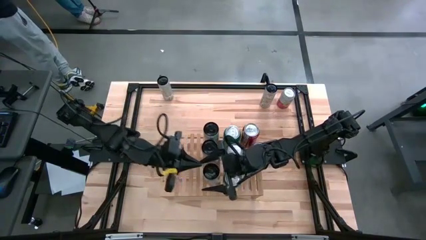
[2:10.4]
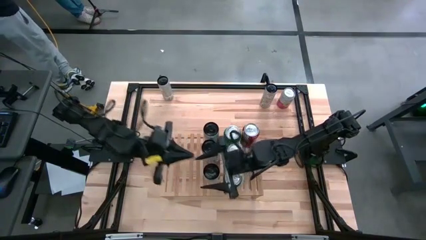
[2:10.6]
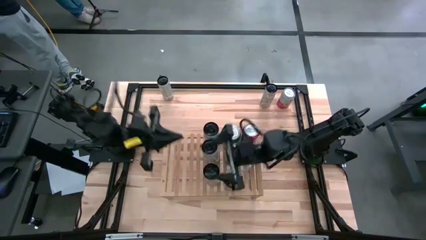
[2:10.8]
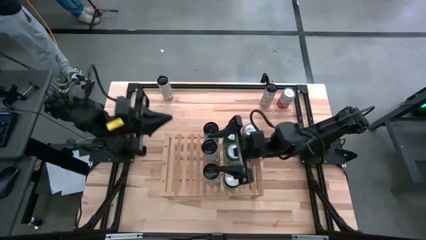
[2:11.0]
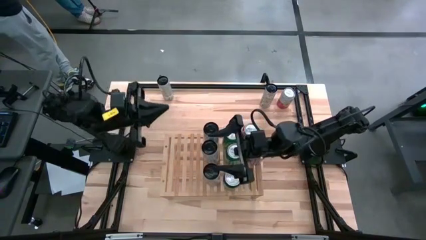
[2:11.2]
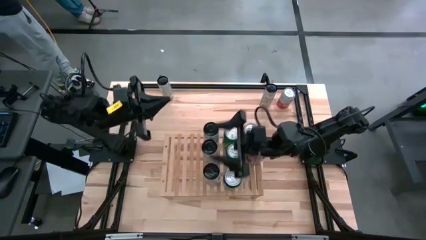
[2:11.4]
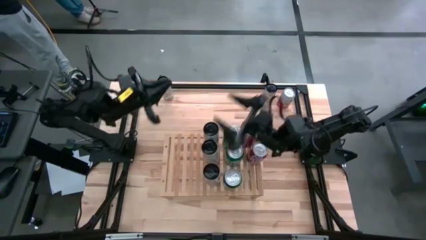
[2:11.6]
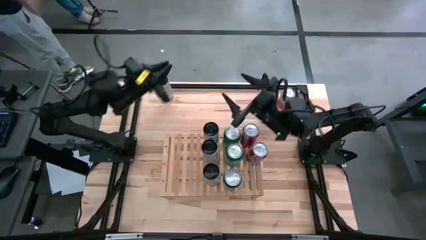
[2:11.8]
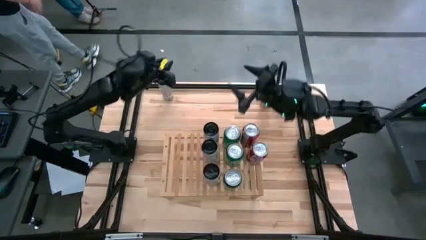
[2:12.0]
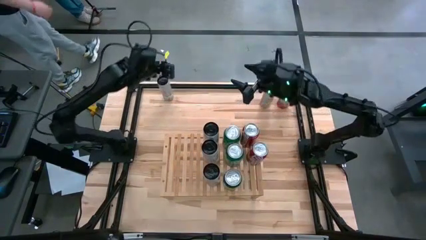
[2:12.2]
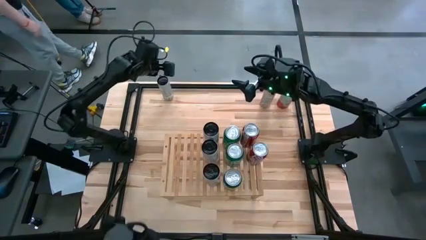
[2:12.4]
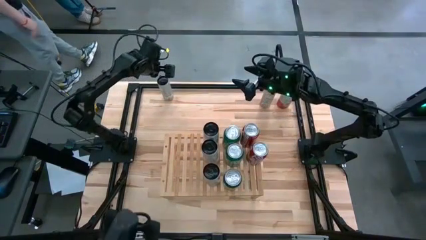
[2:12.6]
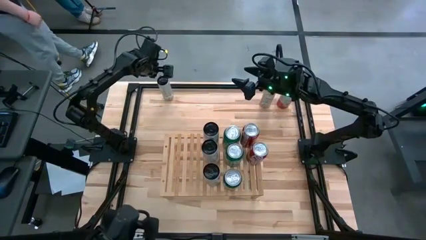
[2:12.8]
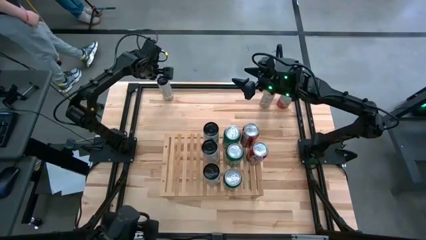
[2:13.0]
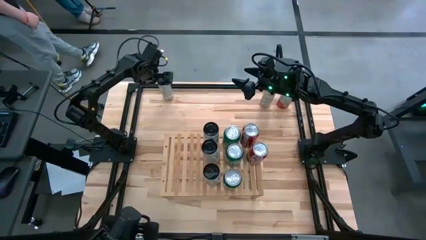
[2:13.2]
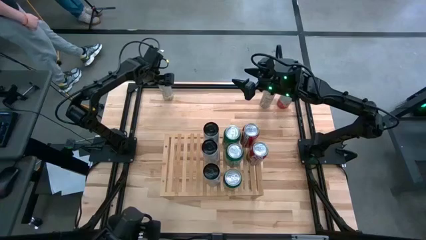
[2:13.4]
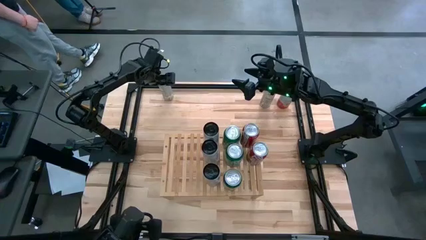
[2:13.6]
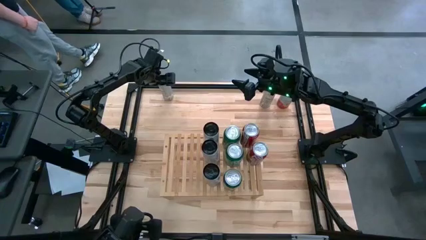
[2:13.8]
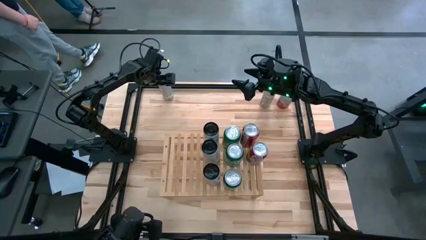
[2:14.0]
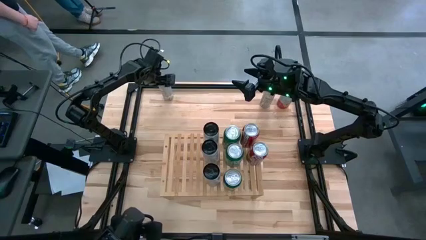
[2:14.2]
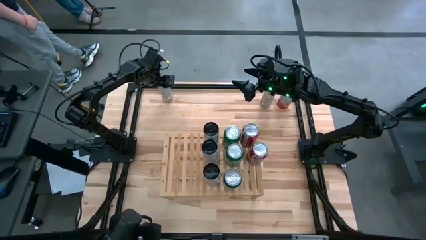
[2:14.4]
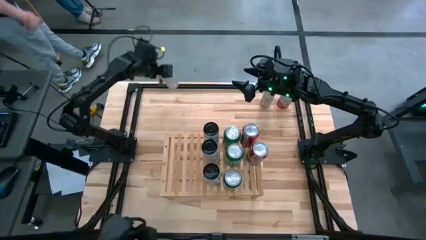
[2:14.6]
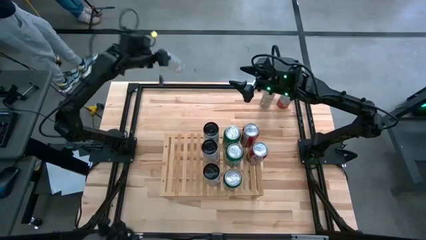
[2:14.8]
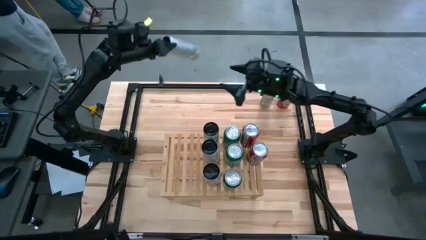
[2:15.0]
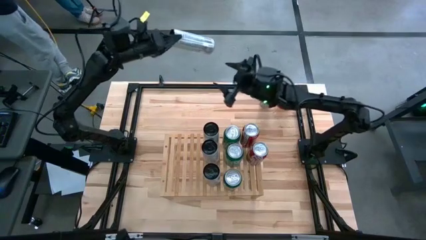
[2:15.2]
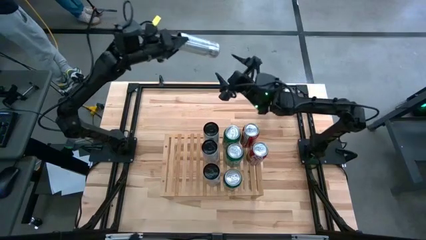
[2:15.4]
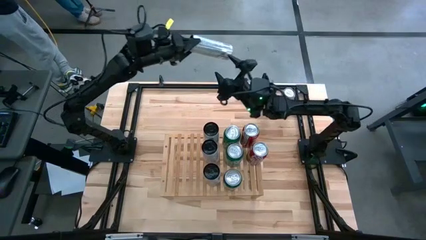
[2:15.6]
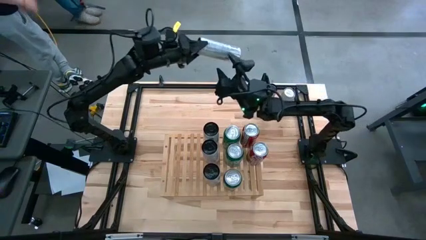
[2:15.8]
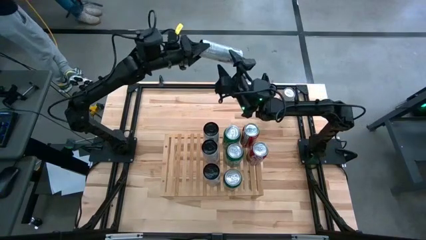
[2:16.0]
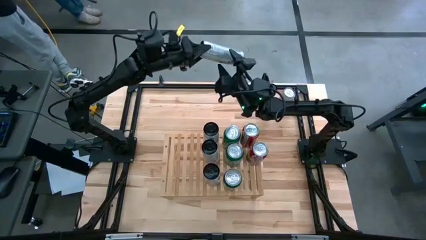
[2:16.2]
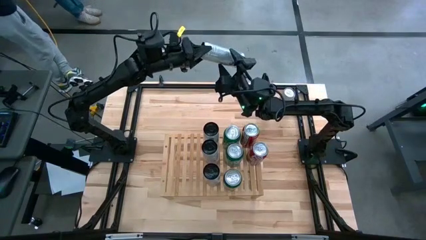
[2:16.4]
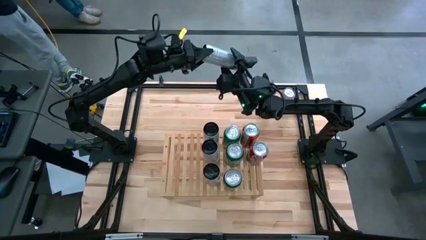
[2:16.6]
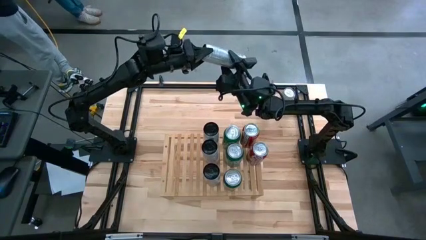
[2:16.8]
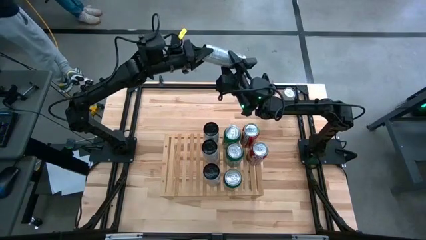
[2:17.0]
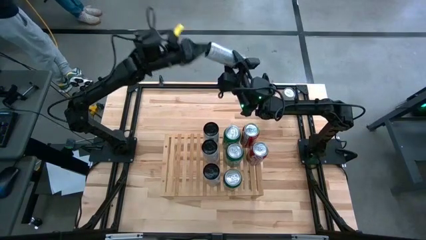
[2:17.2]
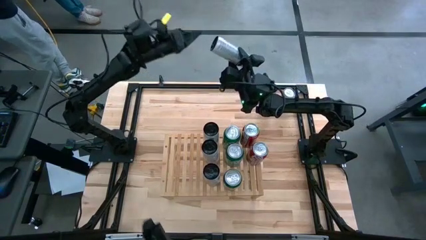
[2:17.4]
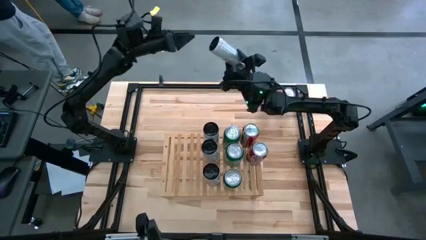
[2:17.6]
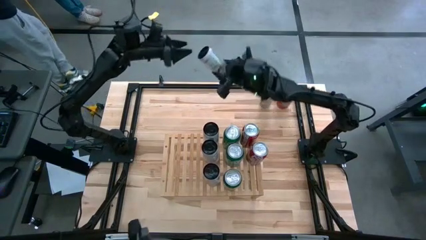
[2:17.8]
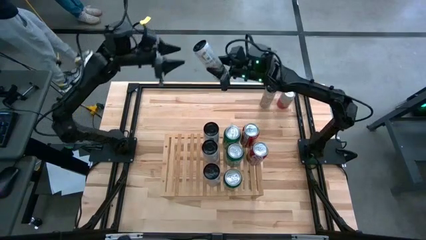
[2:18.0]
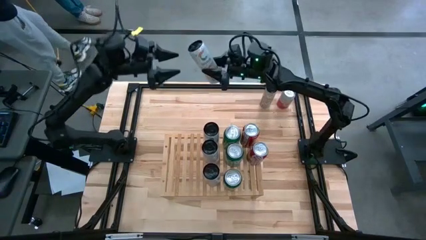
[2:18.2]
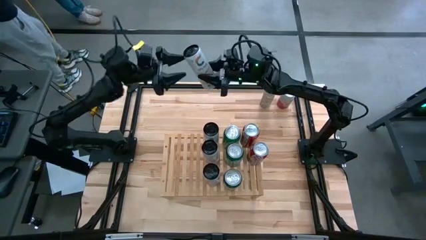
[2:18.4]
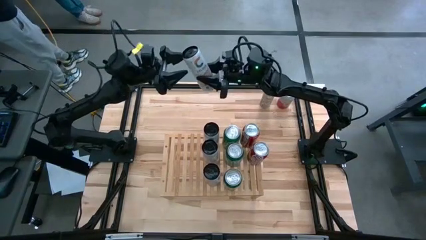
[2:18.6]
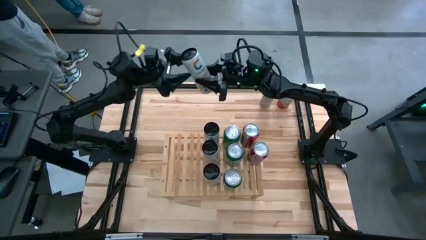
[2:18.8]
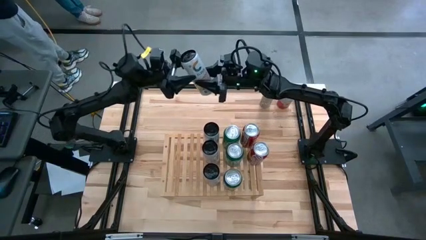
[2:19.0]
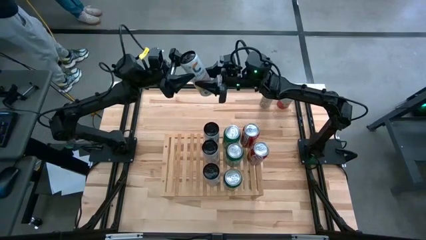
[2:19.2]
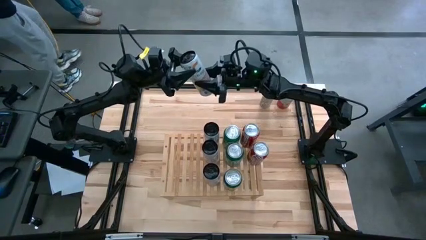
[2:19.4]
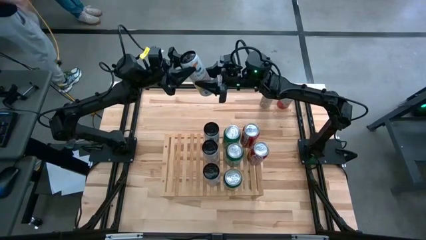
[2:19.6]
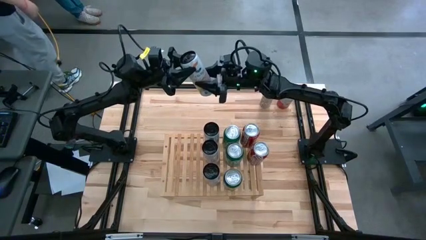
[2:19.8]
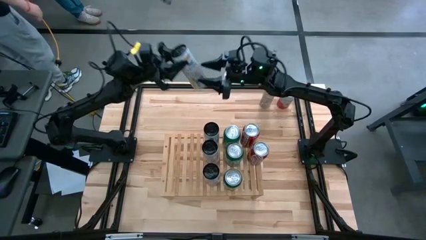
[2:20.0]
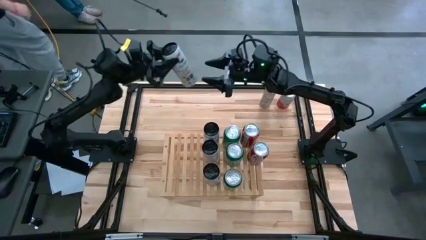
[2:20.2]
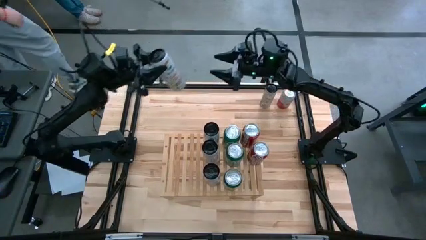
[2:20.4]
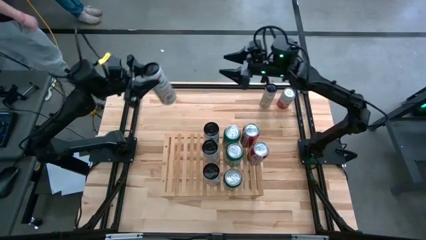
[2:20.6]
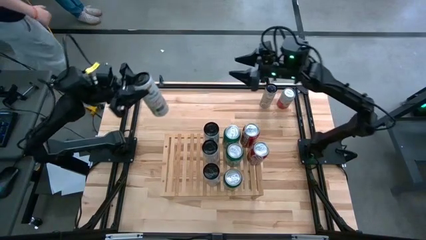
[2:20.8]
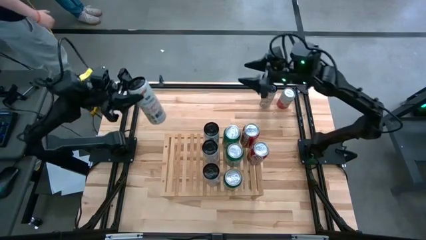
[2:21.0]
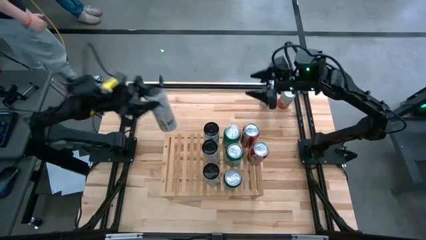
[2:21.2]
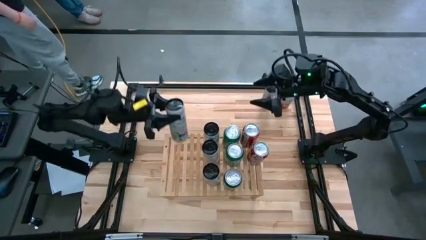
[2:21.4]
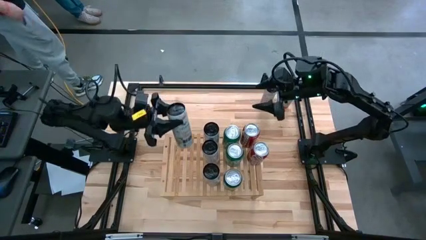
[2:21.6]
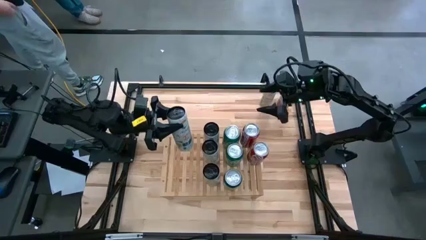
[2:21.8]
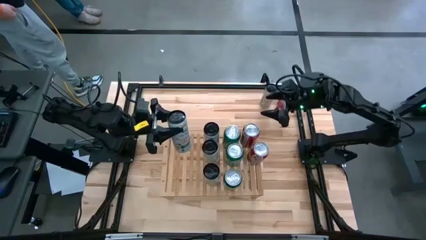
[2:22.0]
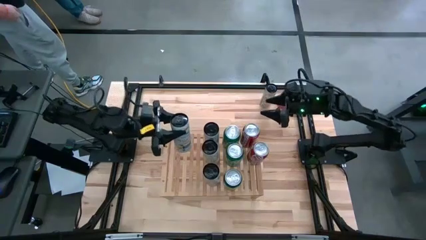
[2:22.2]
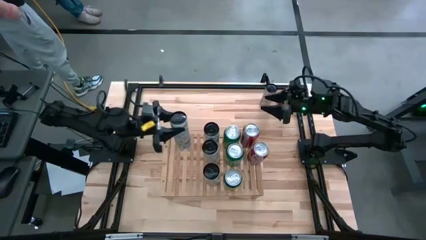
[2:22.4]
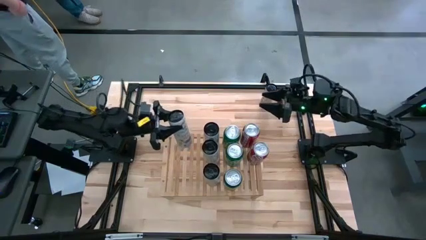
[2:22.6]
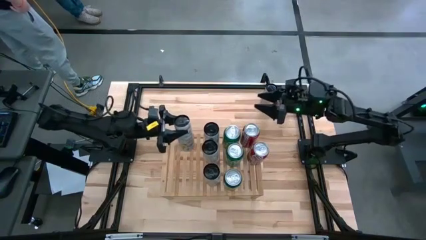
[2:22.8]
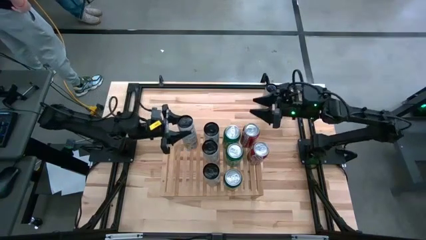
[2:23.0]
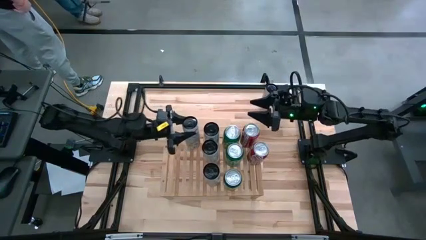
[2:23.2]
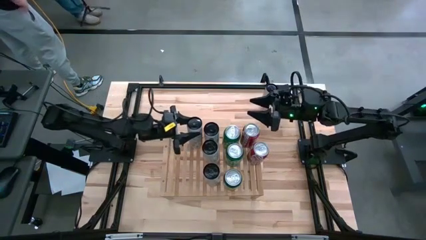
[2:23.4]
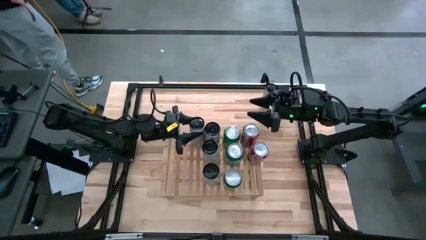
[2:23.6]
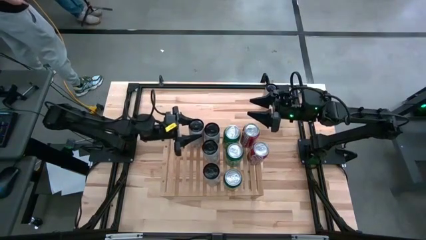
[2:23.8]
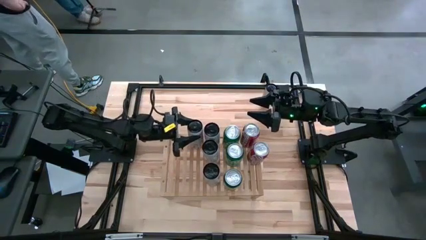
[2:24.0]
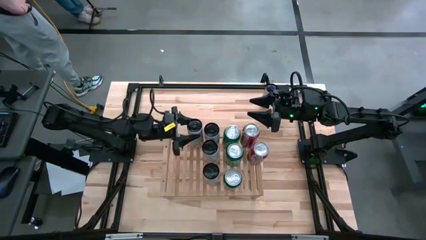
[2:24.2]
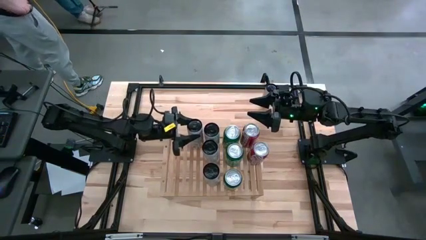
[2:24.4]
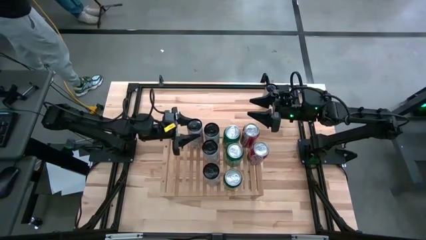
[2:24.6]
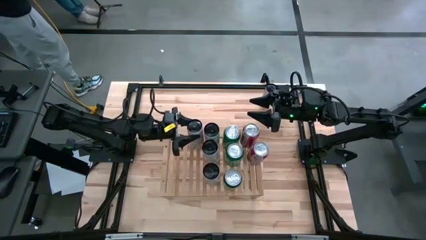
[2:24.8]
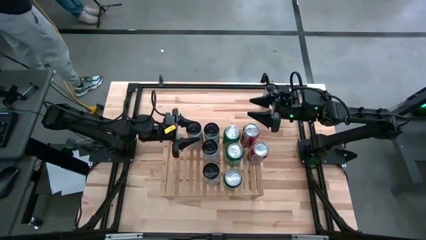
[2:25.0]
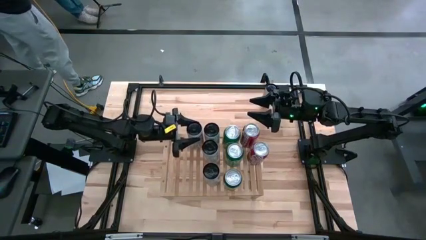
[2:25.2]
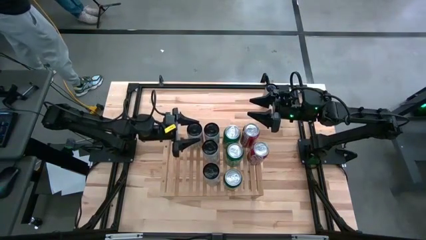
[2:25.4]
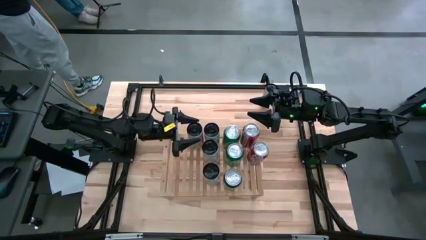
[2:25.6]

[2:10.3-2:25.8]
Task: Place canned beverage on shelf
Put the left white-yellow soda can on the shelf

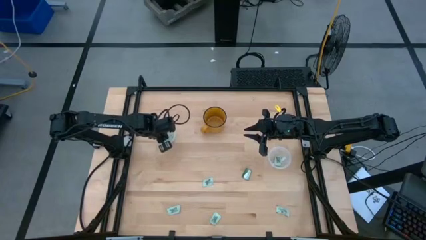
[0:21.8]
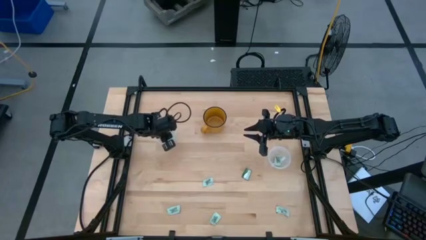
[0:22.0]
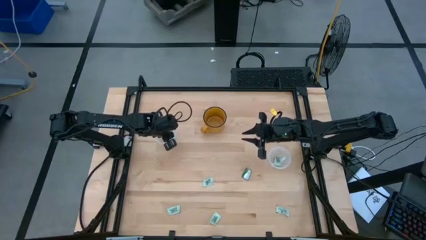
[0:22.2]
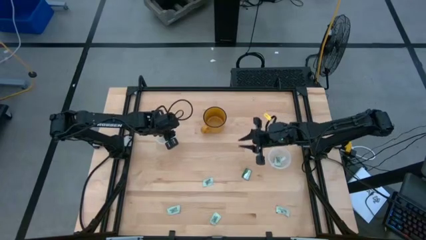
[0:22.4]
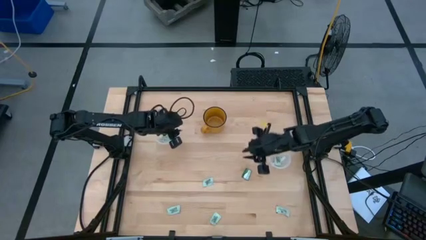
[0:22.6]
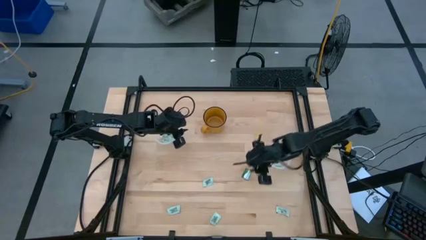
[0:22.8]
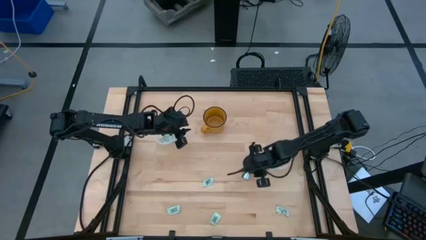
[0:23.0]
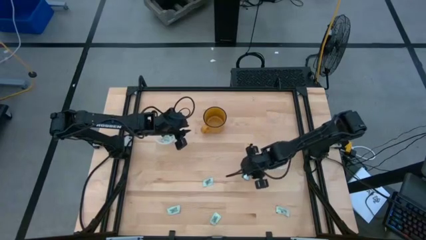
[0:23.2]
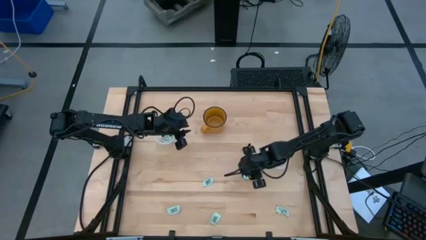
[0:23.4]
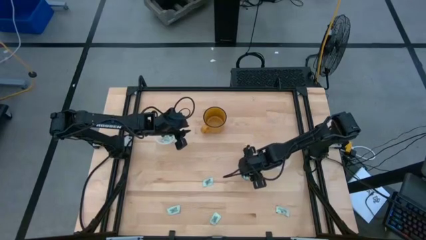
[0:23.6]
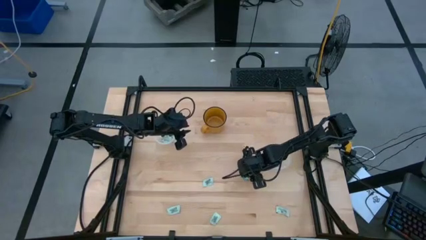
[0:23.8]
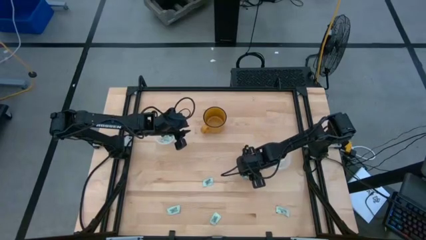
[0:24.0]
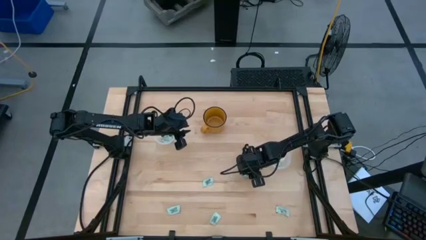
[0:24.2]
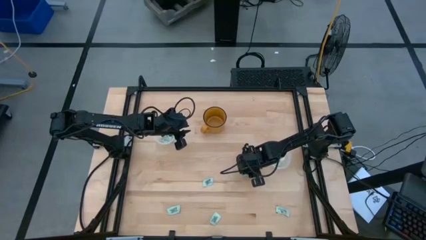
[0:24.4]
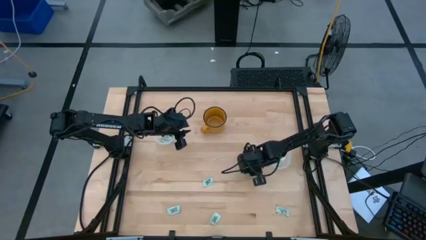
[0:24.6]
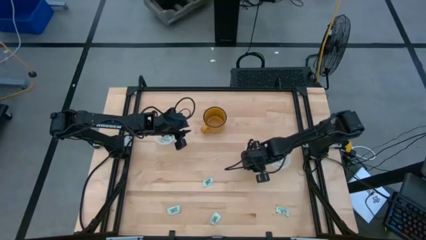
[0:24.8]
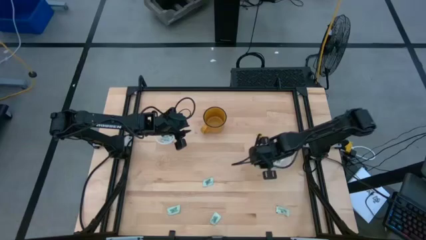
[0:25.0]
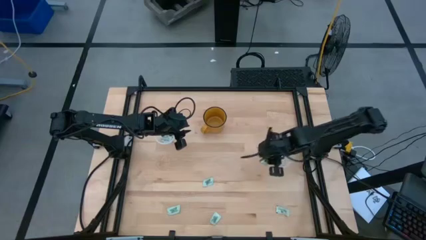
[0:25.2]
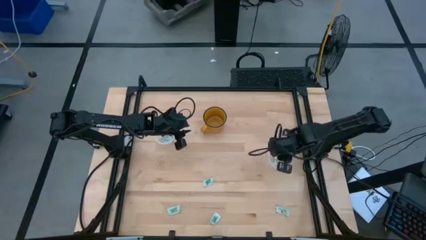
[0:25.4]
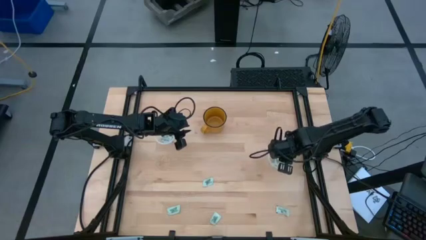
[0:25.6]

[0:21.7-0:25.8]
Task: Pick and place Stevia / Truvia into bins
Put the green stevia packet into the right transparent container
